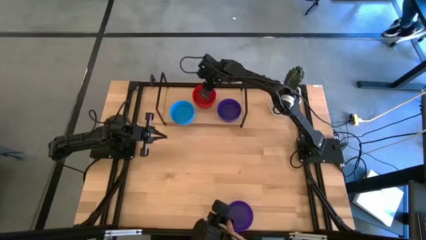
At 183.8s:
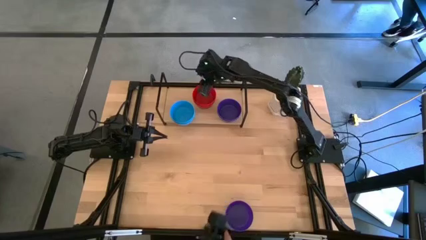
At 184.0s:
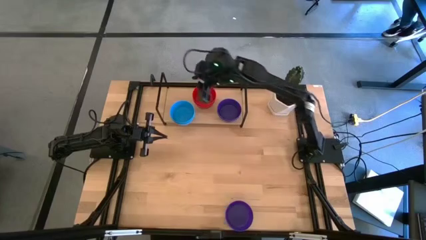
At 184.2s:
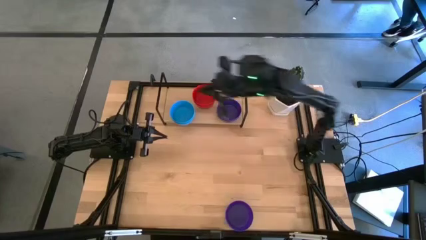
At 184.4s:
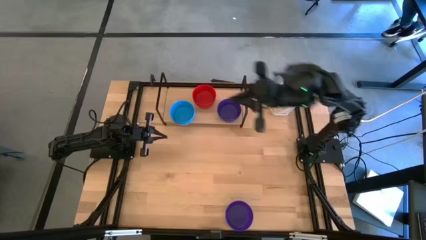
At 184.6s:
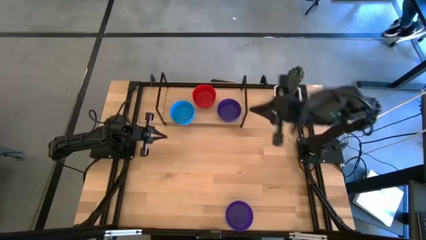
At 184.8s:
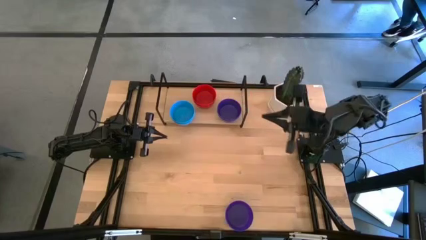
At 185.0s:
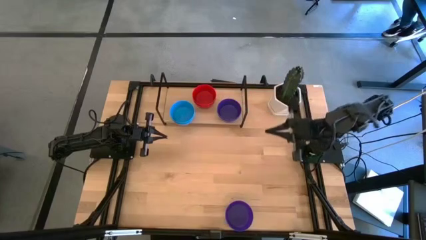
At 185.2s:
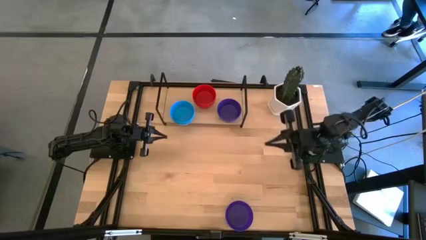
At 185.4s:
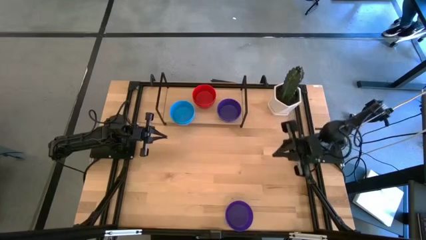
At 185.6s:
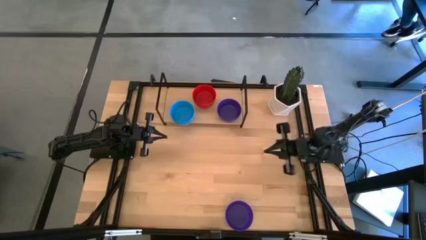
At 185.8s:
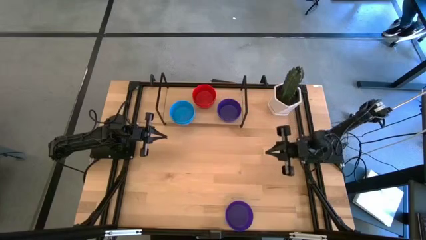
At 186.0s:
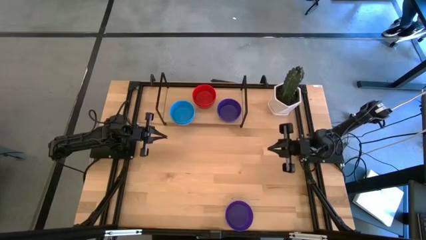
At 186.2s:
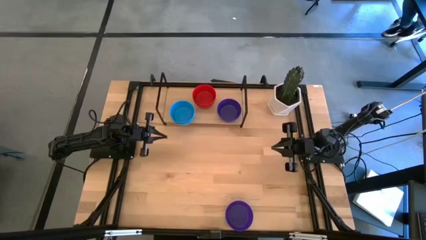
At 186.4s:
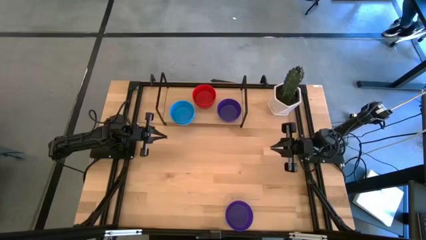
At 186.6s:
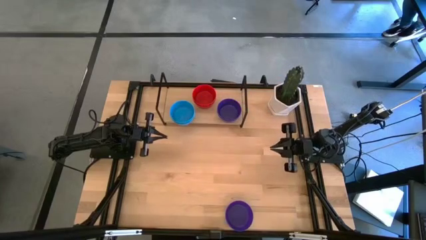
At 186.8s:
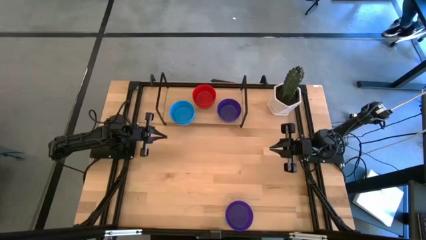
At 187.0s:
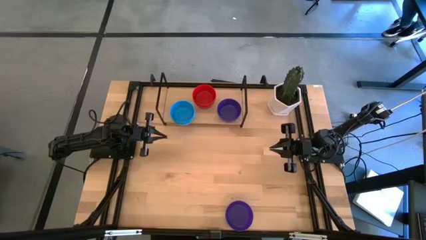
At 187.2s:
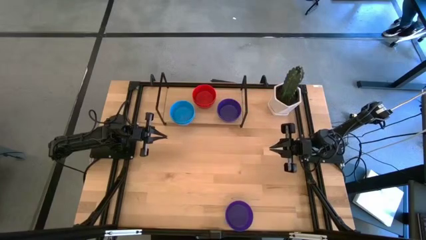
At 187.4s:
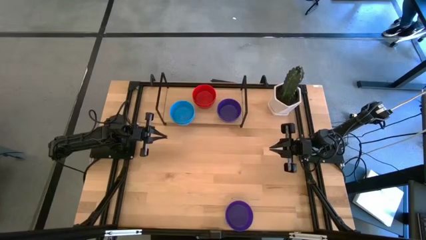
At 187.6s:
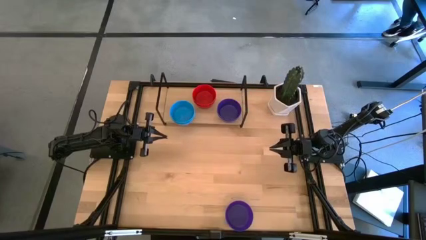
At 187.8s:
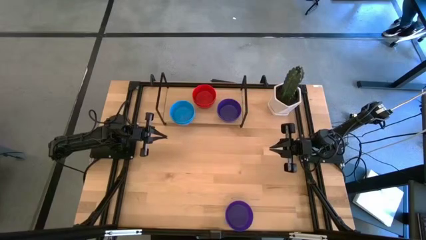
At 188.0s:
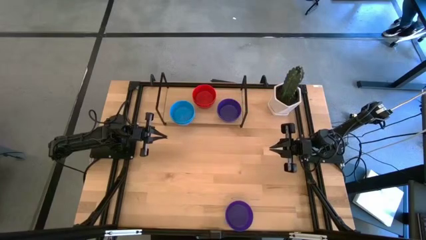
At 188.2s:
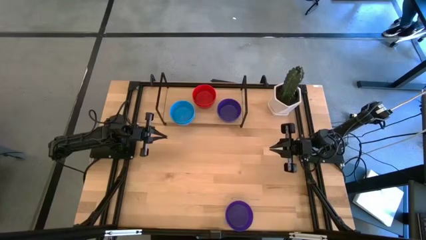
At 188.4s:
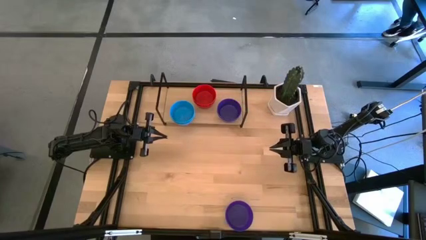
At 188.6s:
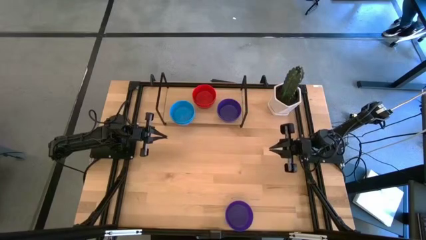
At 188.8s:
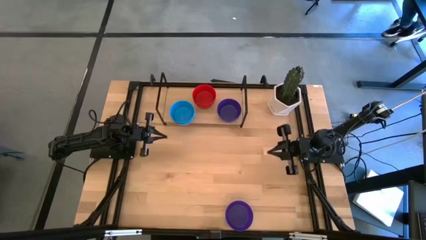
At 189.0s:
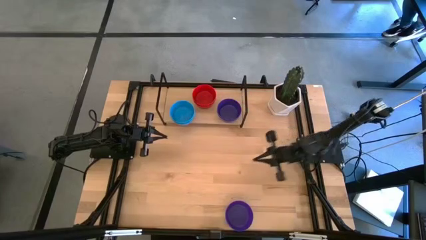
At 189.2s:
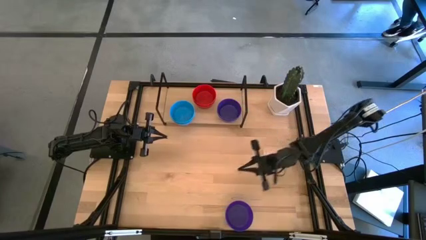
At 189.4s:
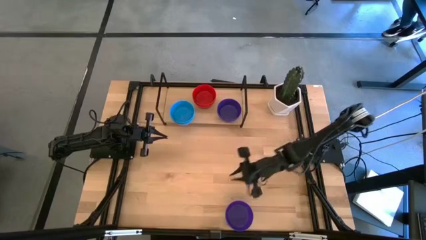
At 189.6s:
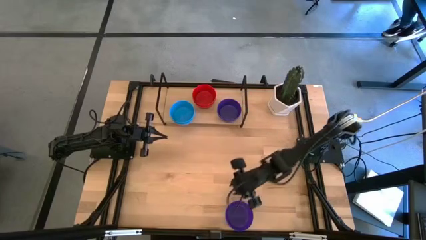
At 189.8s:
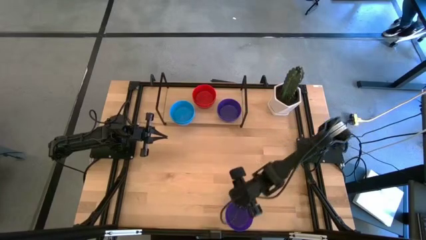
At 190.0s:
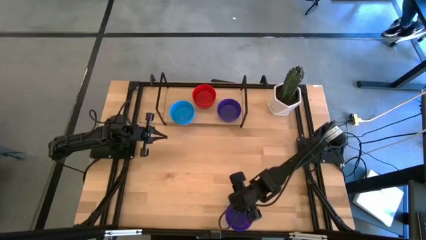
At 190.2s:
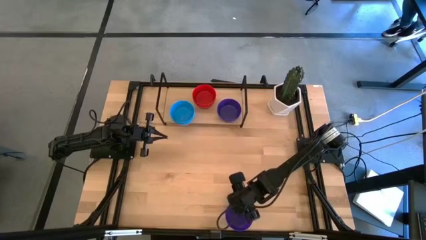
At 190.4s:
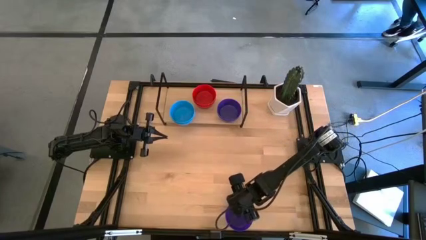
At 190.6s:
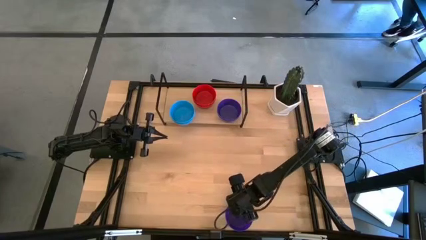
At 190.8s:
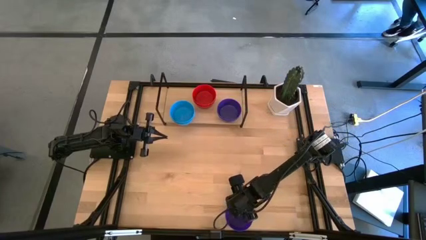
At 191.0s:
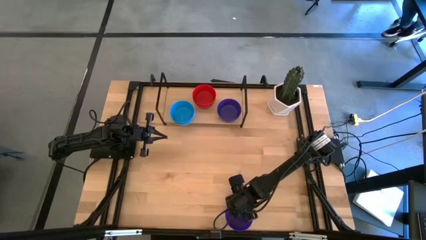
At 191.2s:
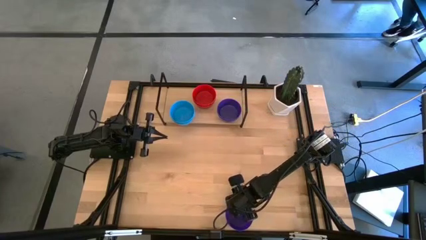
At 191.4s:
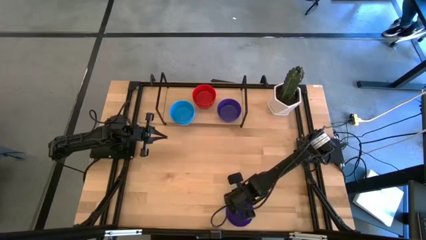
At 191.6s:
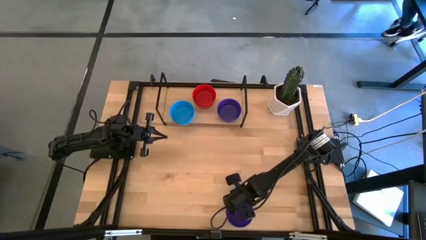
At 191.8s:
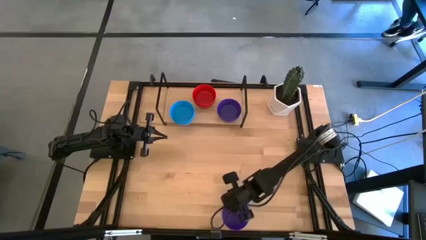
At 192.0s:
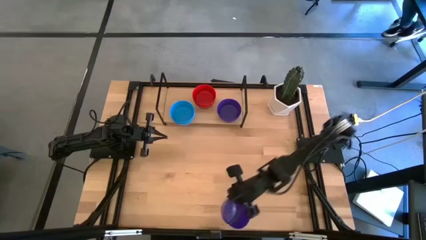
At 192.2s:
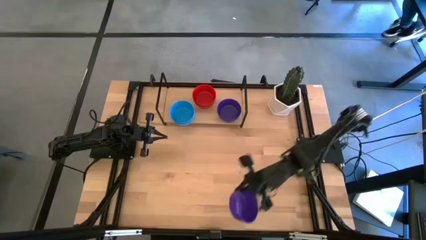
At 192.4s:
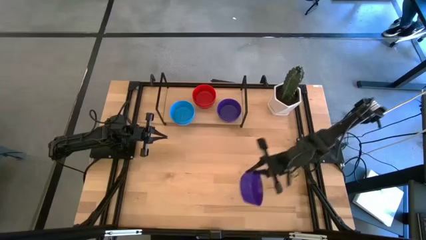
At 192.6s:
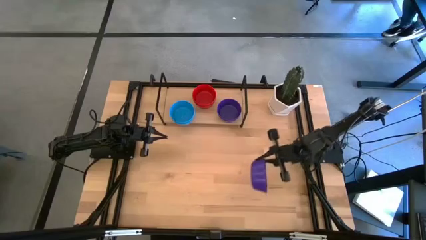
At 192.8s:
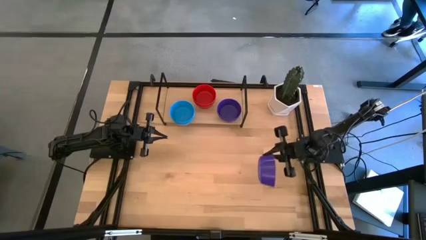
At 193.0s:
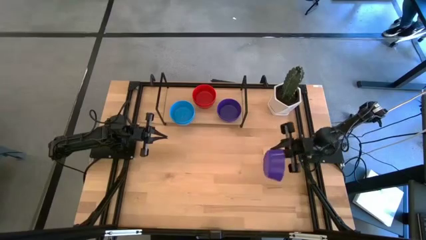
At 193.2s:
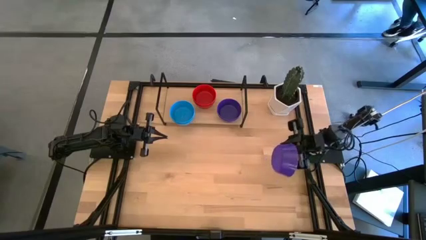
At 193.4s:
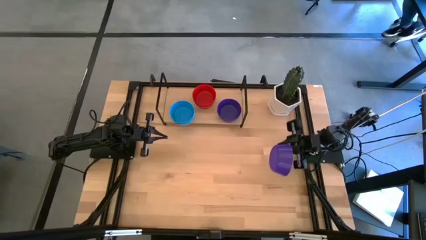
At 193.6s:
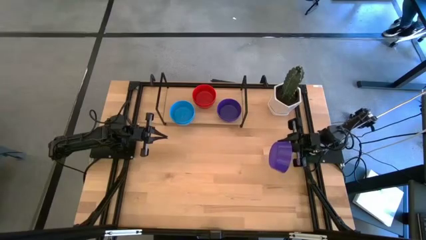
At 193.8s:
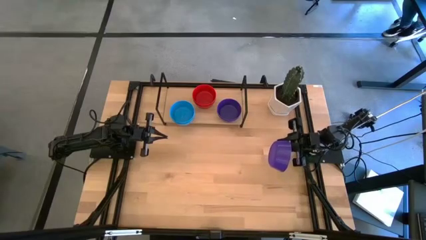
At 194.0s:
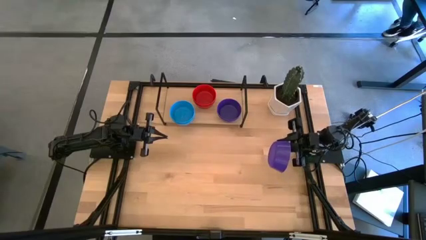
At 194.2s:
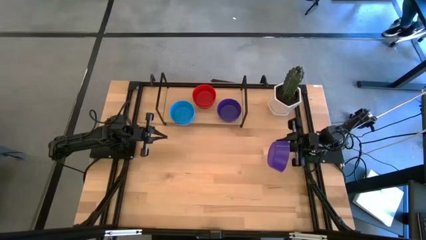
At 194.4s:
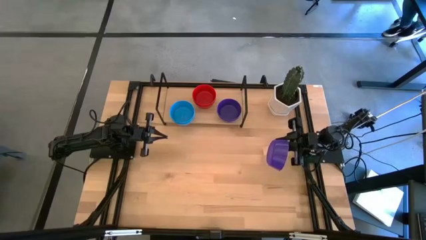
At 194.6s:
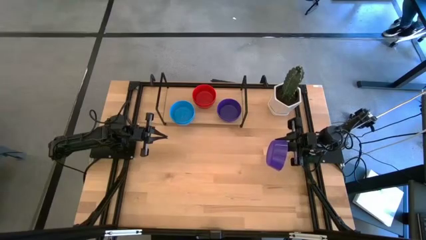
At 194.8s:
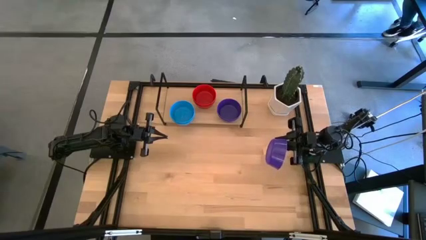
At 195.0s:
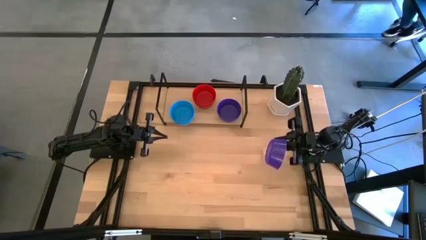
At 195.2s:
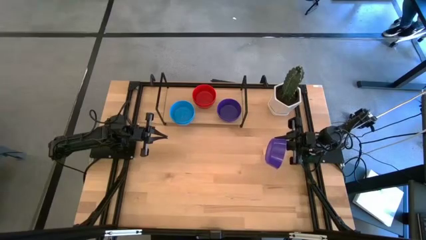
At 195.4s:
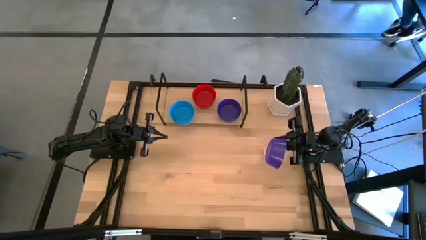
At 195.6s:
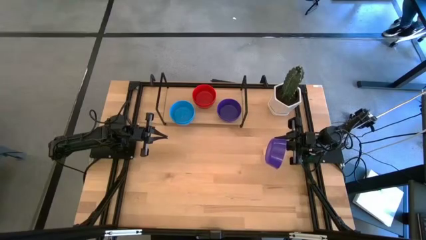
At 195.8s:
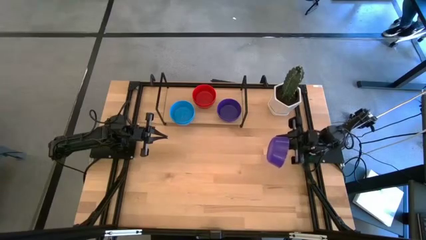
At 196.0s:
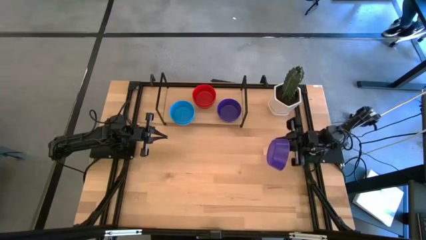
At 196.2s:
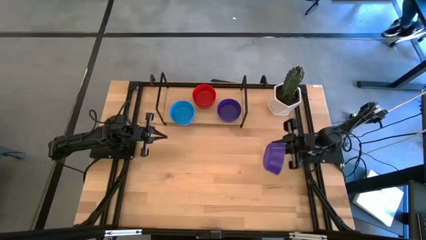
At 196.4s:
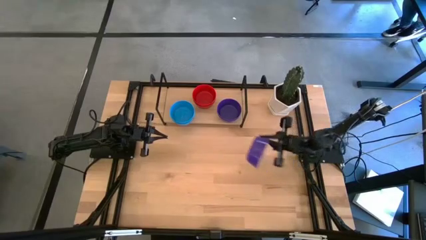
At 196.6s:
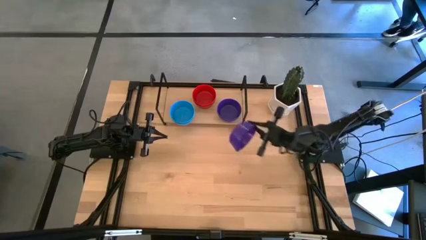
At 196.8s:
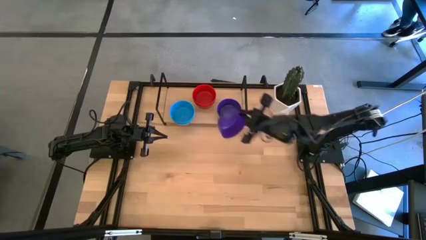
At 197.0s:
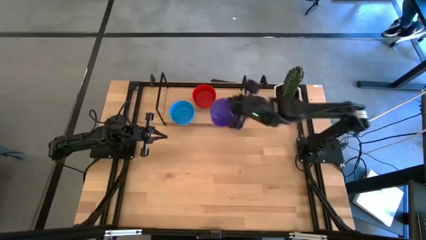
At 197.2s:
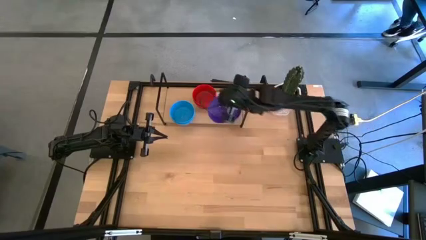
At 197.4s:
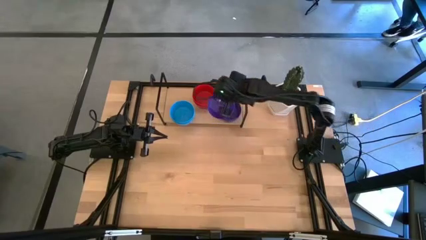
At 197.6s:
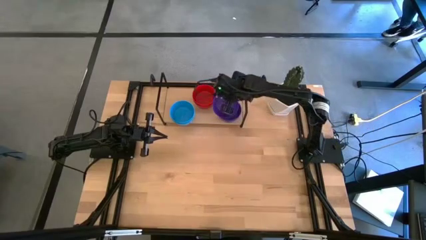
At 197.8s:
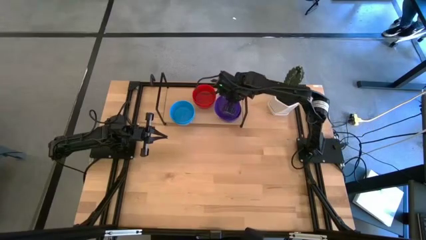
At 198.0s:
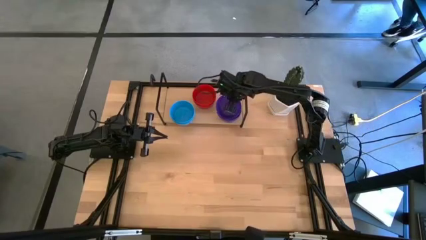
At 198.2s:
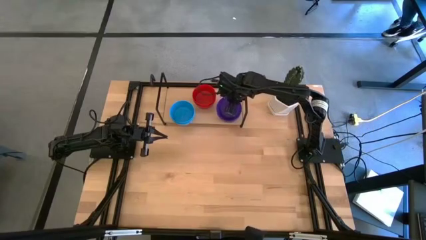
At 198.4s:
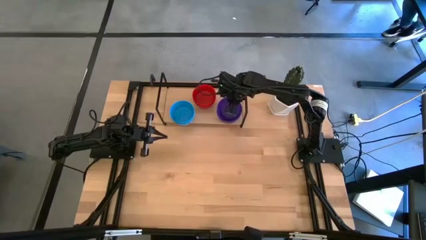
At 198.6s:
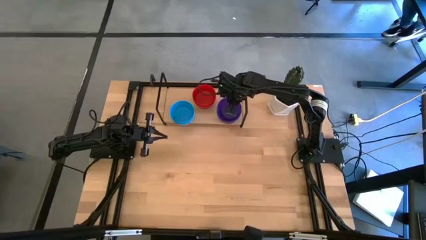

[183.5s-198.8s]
Task: Pick & Place Mini bowls
Stack the purple bowl on top of the purple bowl on the shelf
